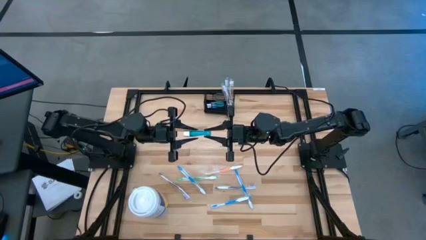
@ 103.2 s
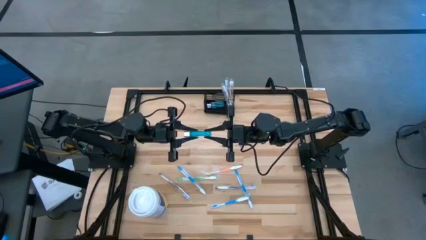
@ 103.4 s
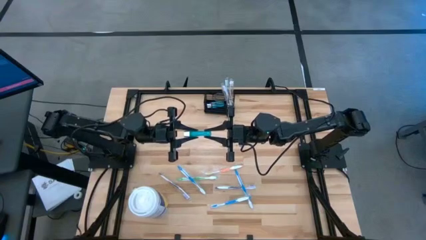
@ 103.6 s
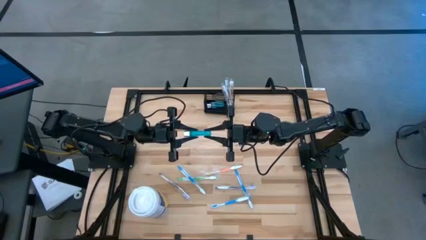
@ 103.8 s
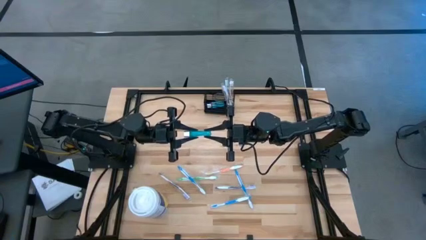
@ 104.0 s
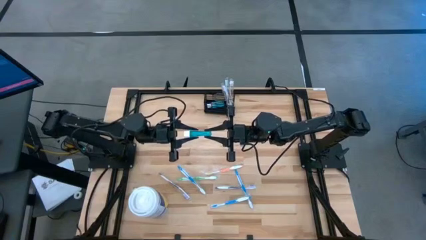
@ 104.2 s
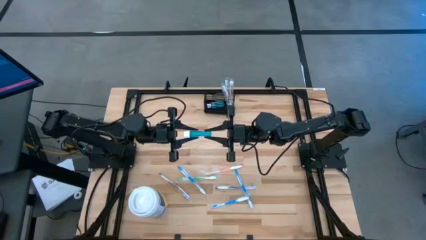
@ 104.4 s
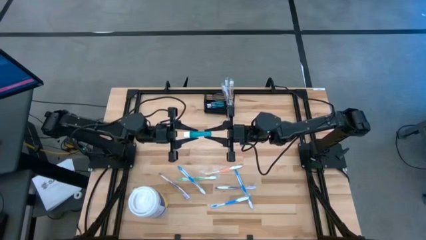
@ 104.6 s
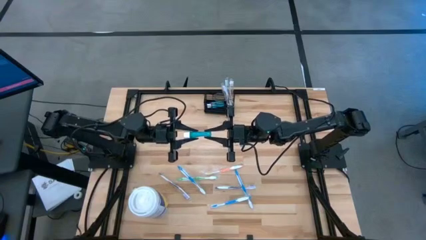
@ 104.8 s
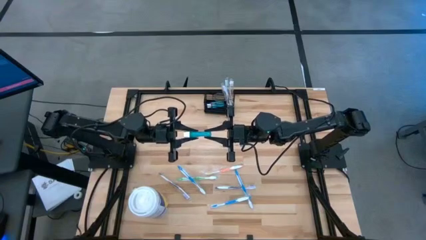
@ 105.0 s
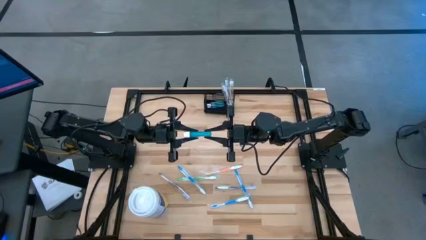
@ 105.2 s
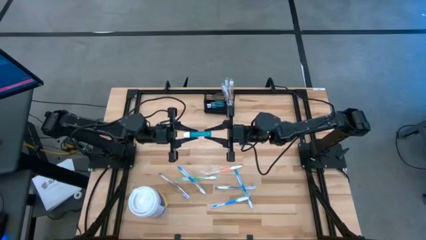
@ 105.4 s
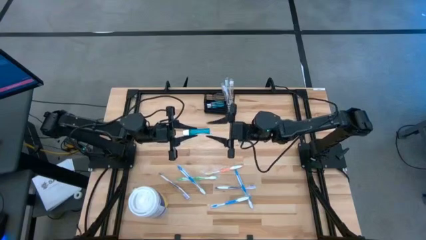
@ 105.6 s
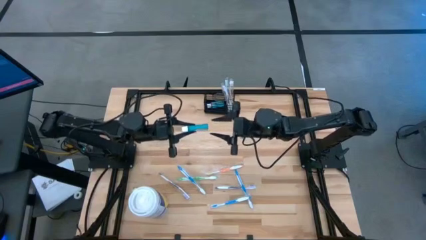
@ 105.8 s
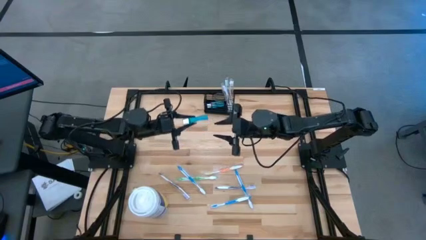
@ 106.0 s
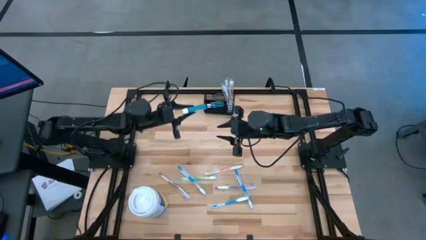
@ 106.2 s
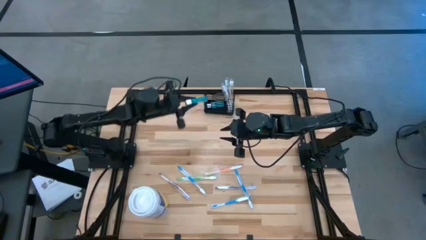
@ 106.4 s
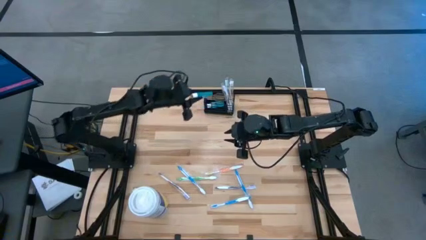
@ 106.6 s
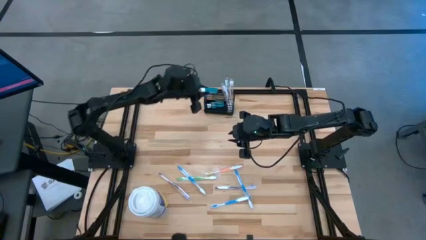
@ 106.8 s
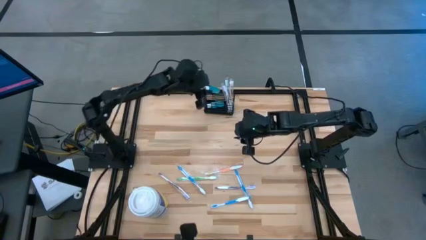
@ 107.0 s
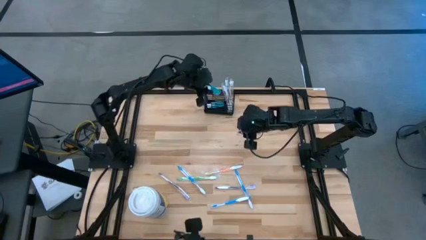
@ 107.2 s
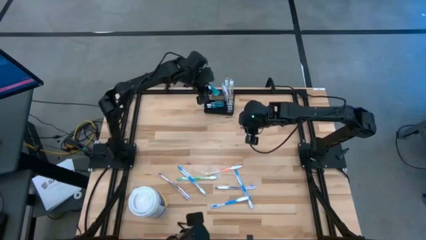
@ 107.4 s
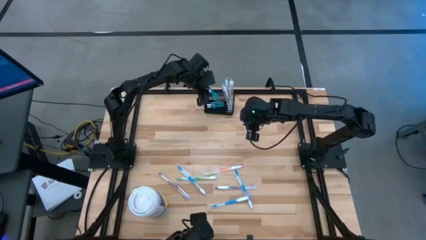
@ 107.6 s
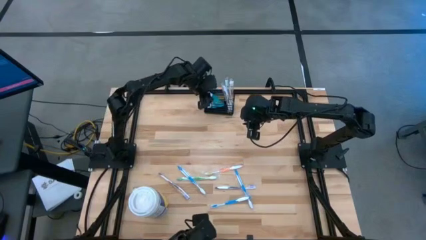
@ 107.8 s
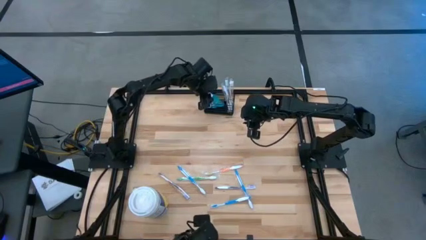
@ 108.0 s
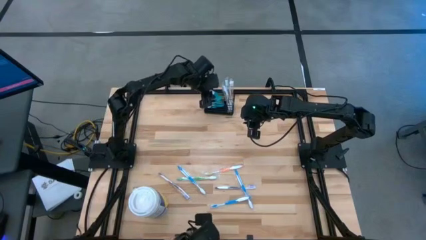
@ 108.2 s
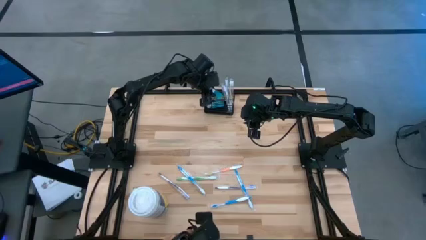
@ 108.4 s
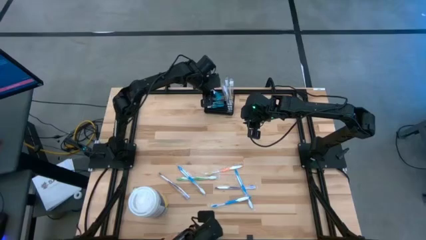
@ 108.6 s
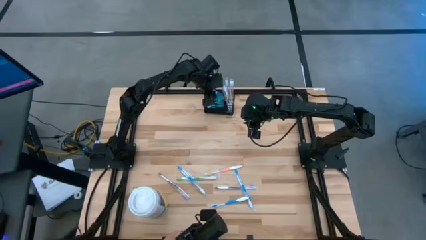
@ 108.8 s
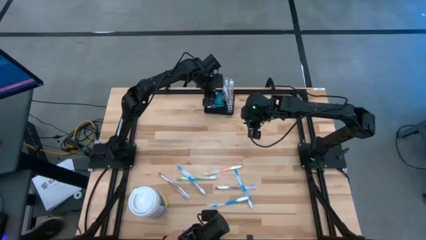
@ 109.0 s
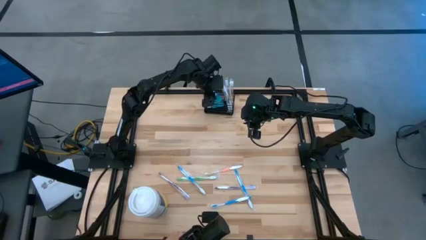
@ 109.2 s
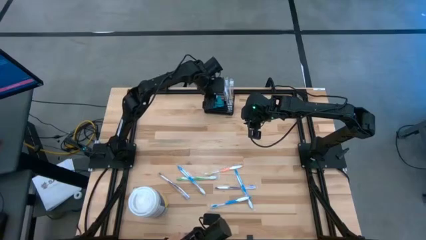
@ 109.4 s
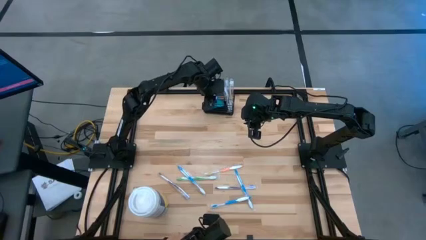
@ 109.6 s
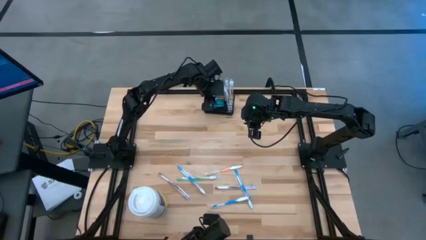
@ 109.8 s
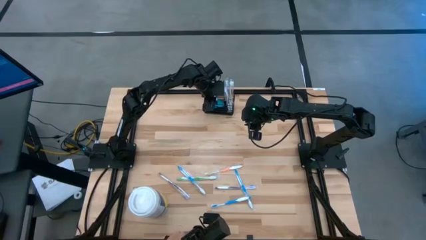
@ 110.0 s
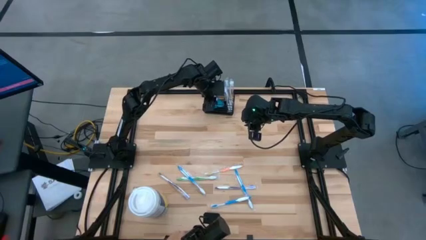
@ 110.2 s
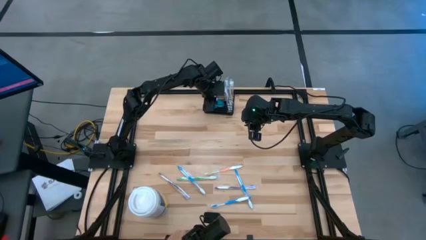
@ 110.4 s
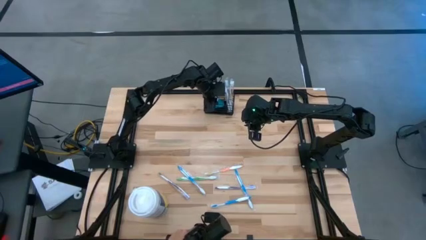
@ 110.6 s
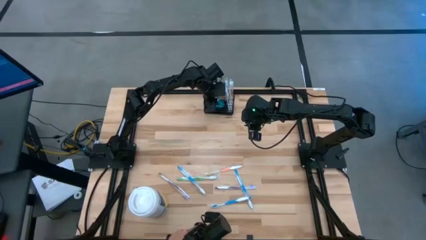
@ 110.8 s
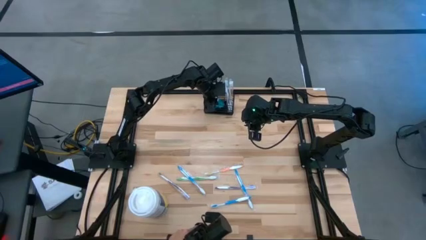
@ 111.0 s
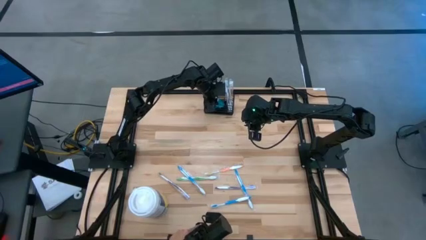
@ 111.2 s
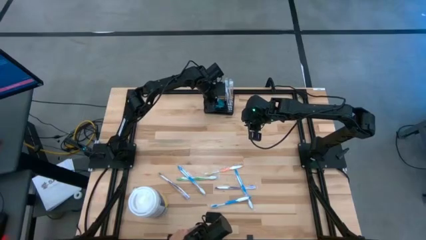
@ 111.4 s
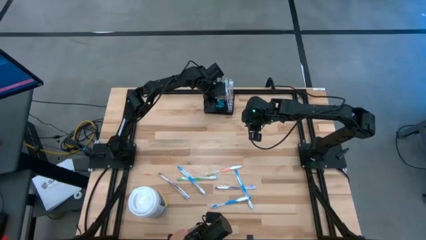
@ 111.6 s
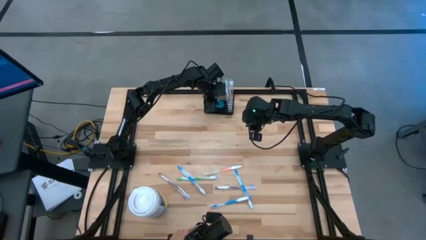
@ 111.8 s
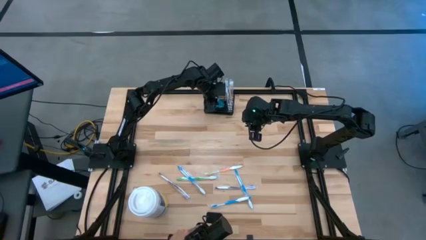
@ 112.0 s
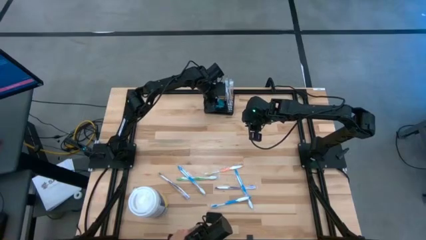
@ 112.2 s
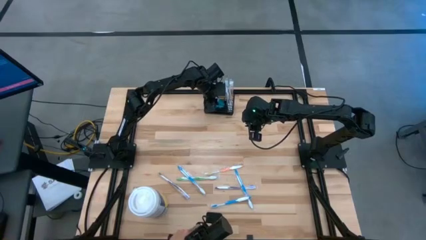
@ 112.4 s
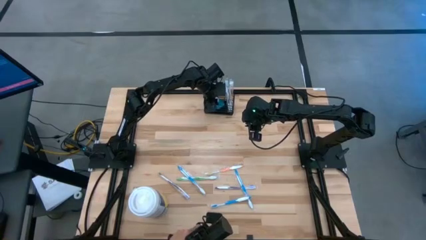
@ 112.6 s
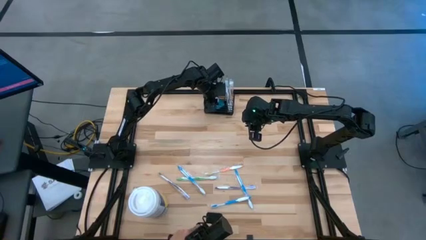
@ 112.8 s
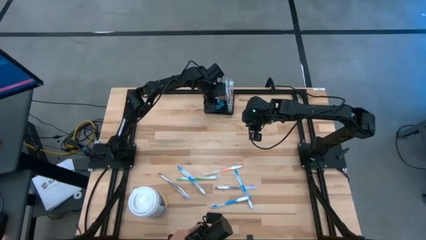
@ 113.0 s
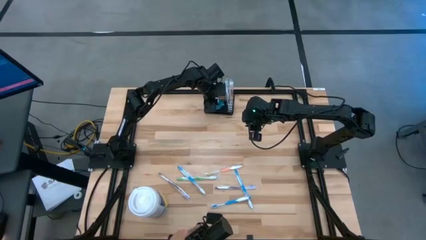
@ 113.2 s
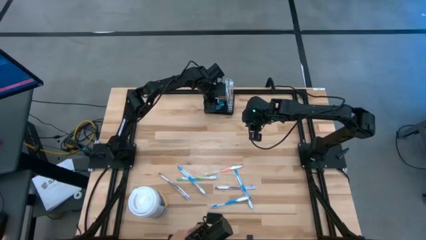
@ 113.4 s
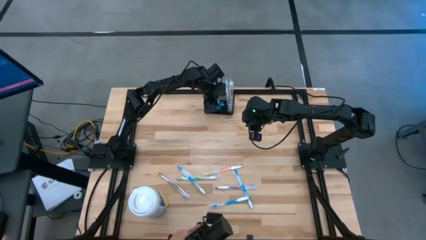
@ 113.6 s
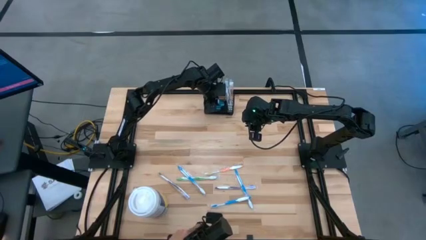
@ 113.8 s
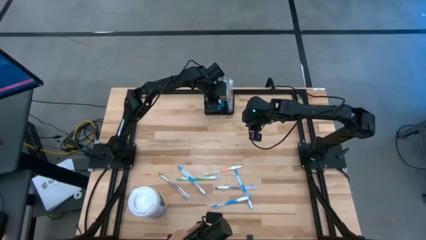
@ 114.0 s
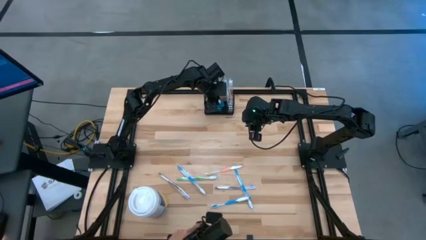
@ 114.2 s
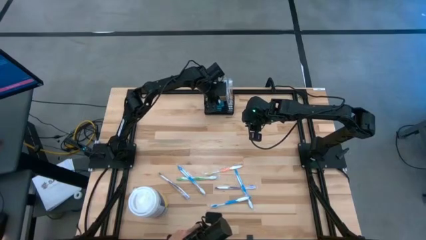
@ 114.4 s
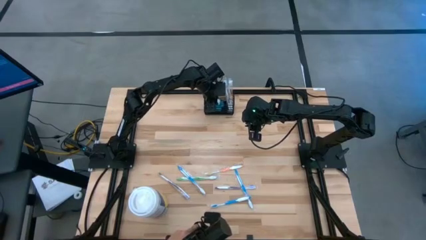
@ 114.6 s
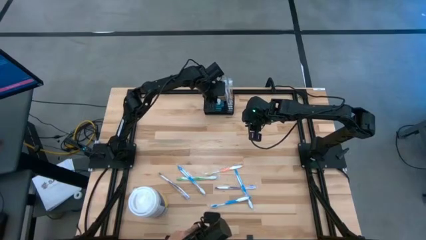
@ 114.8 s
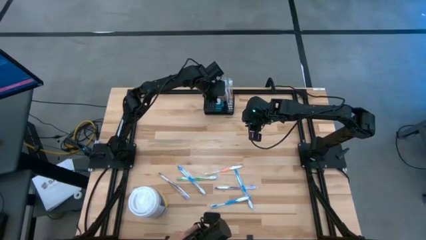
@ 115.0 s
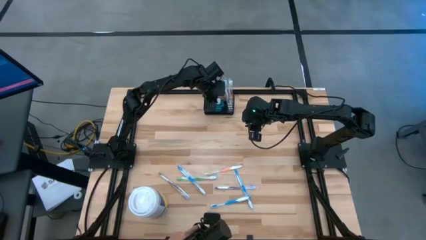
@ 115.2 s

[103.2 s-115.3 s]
Task: Pick & Place toothbrushing station
Put the blue mouthwash into the mesh organizer

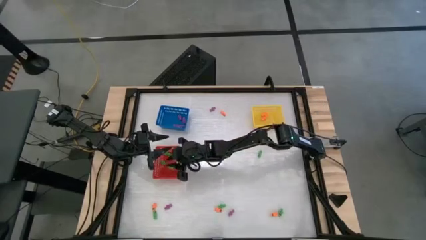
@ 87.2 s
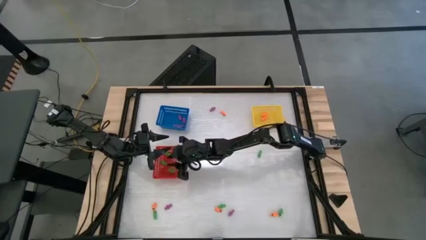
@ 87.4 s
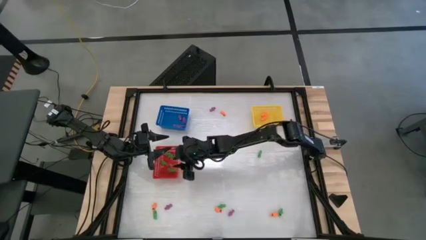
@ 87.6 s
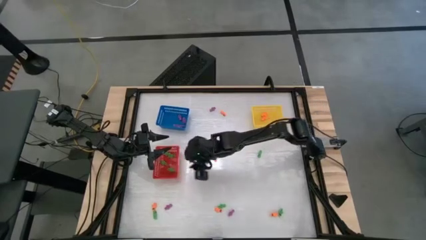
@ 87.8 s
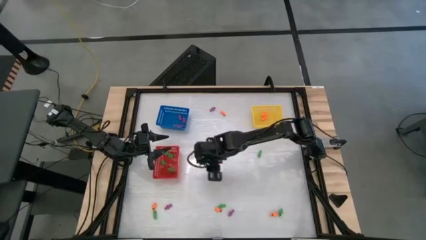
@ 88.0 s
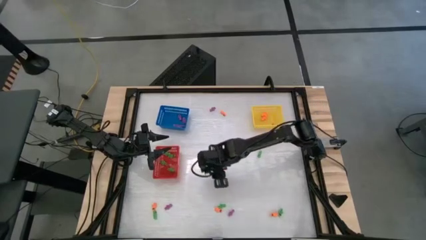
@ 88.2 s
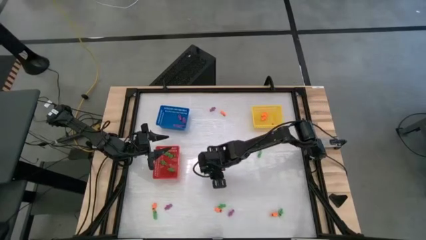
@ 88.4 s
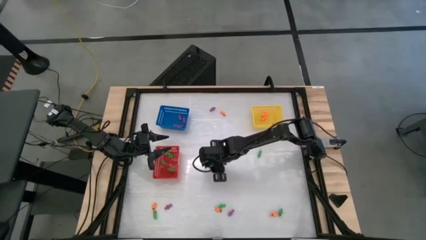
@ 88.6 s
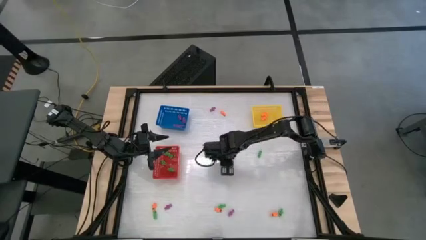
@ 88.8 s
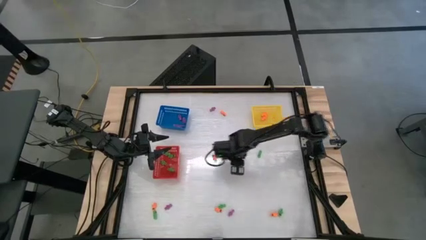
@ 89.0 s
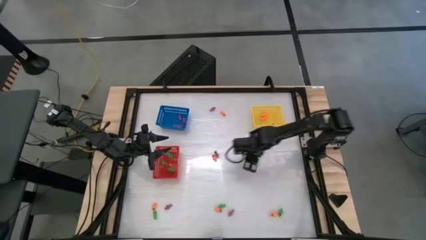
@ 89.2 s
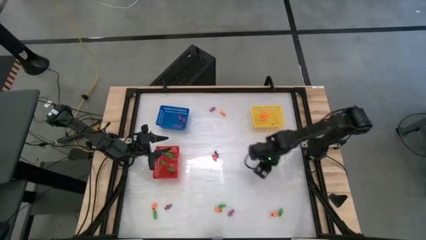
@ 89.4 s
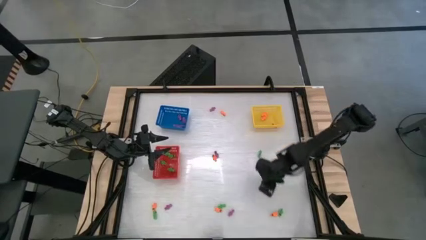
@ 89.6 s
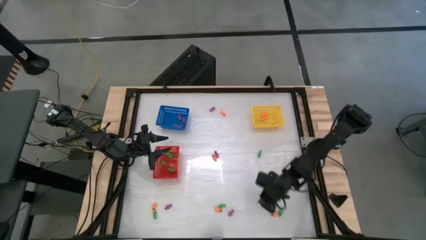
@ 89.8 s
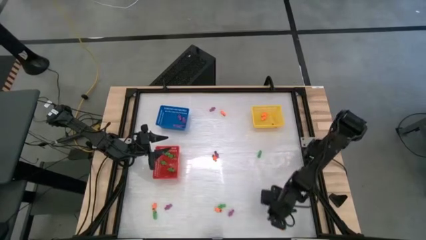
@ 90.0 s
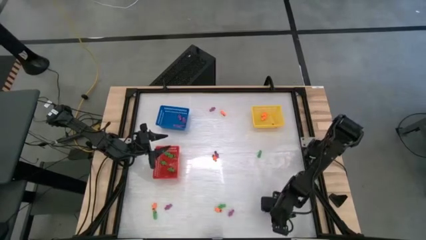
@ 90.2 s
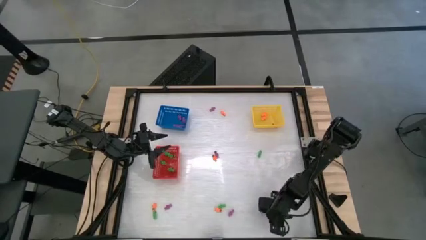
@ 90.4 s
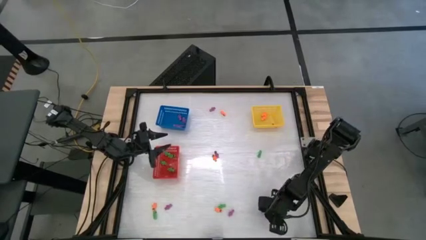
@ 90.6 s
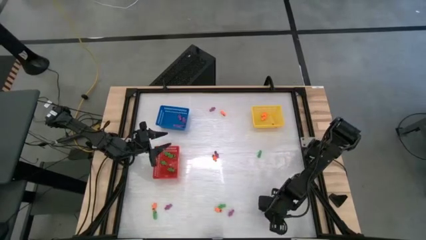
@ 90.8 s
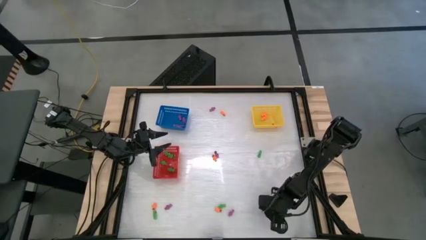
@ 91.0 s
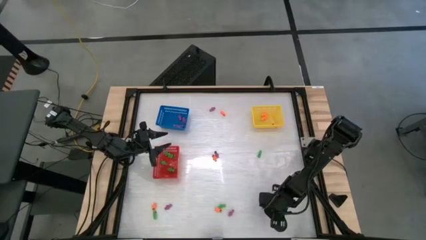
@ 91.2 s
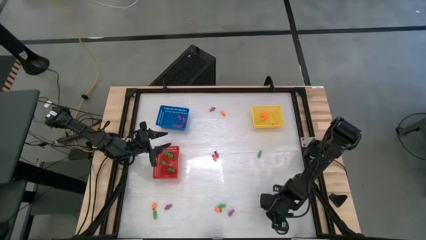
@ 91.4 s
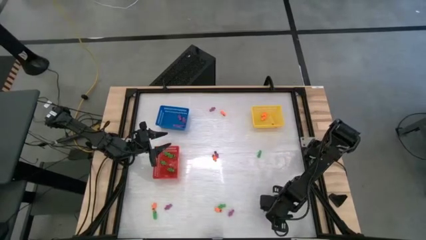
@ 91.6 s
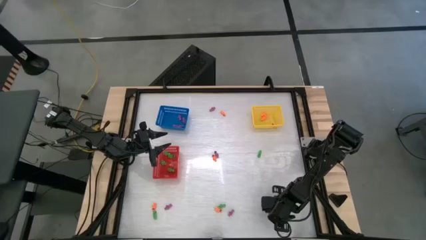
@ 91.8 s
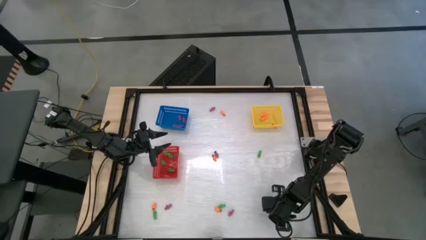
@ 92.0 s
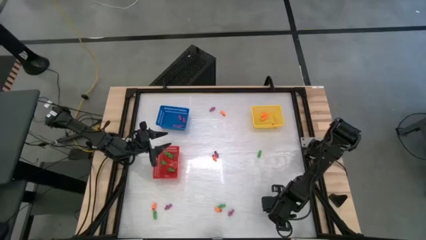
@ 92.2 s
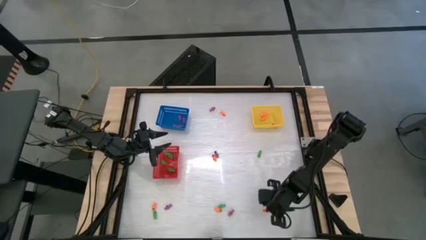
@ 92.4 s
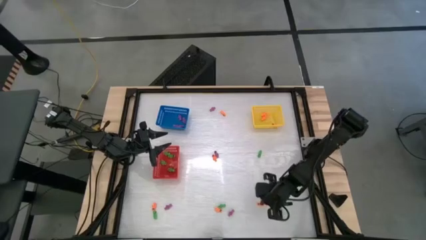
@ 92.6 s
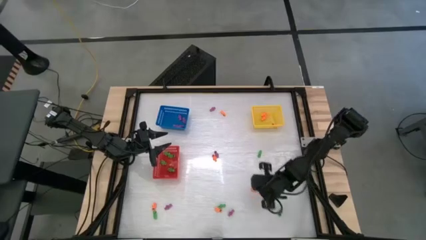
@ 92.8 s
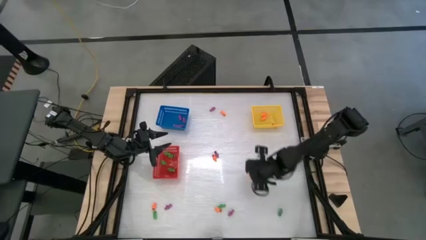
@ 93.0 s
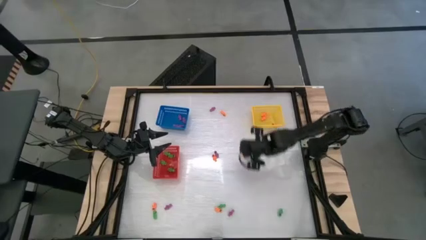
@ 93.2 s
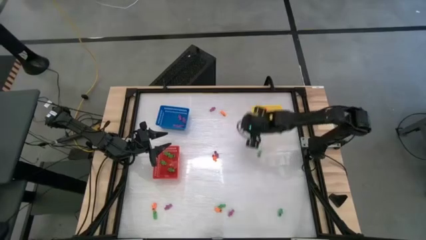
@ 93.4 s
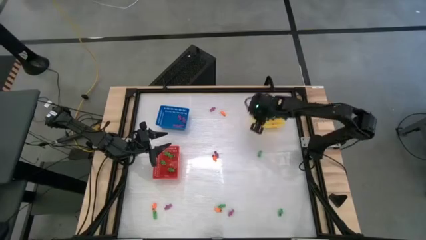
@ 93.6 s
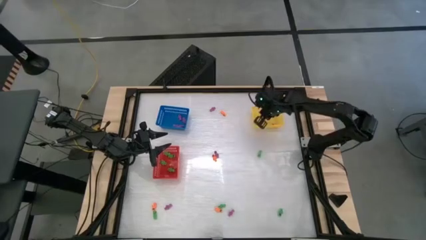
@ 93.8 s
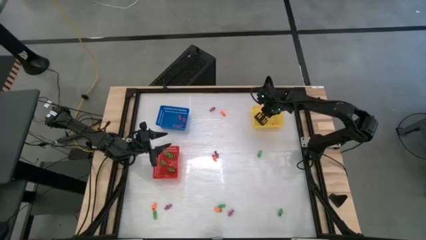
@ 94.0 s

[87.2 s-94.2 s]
Task: Sort Halloween decoration
Put the orange skeleton toy into the yellow bin
